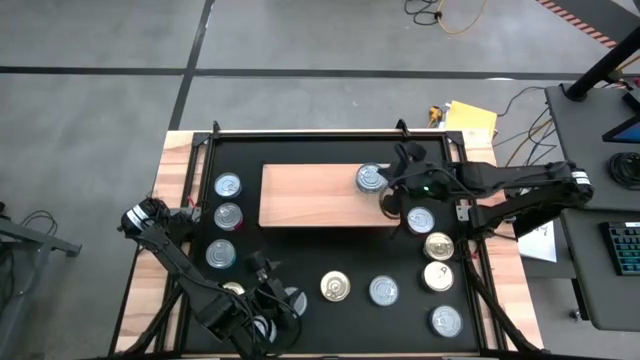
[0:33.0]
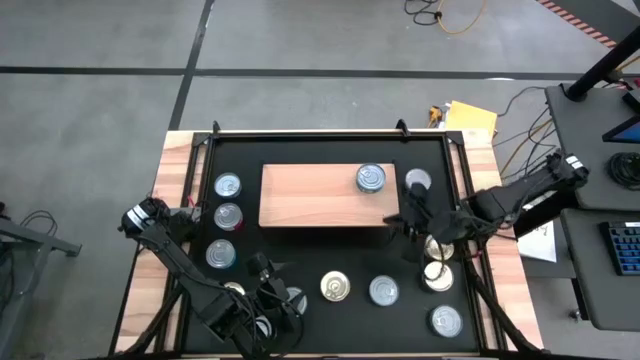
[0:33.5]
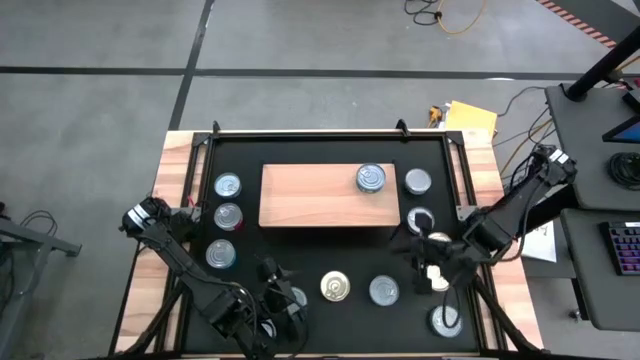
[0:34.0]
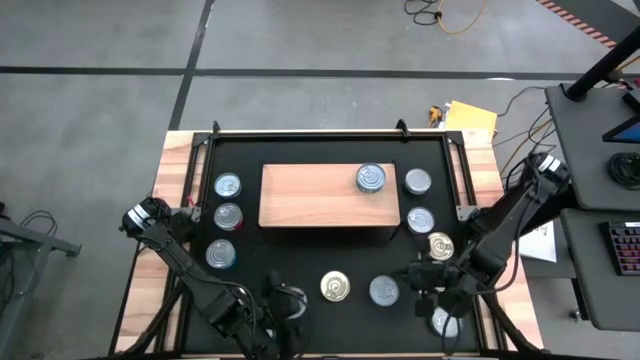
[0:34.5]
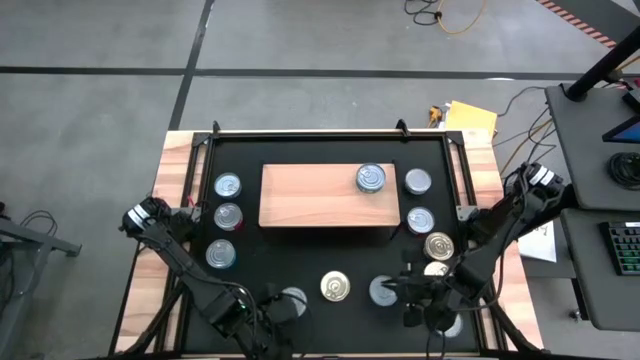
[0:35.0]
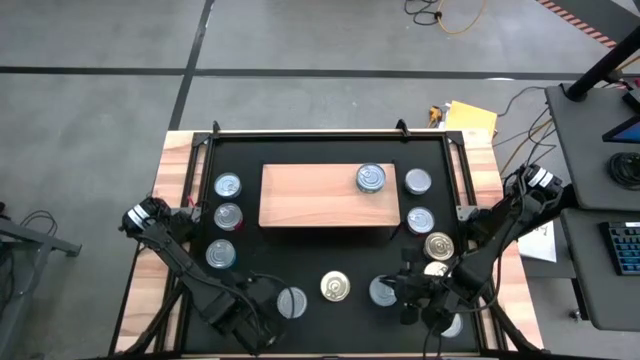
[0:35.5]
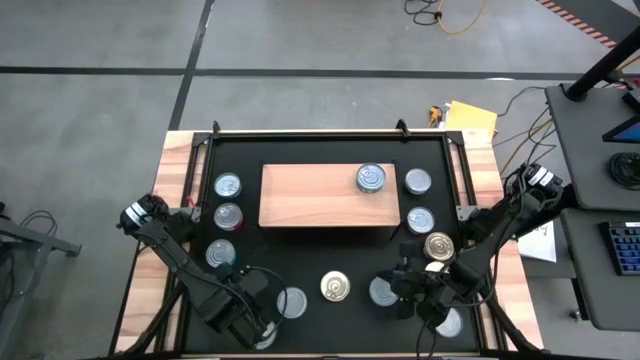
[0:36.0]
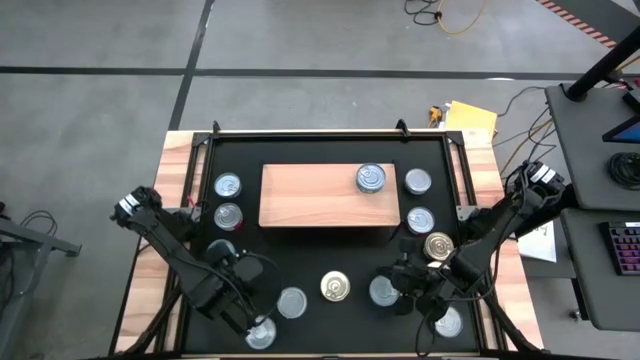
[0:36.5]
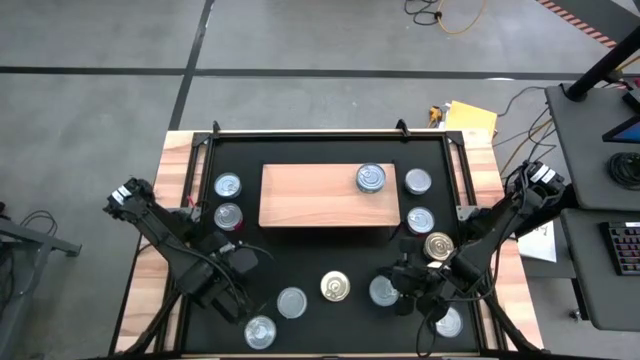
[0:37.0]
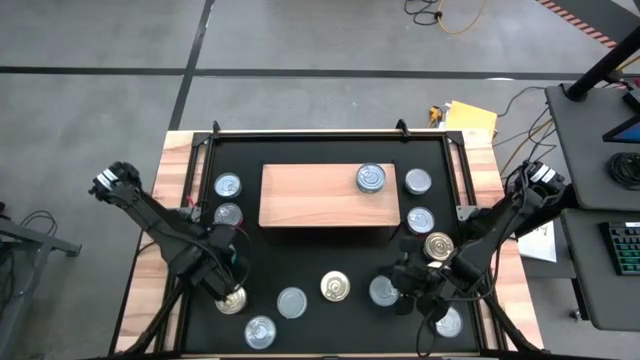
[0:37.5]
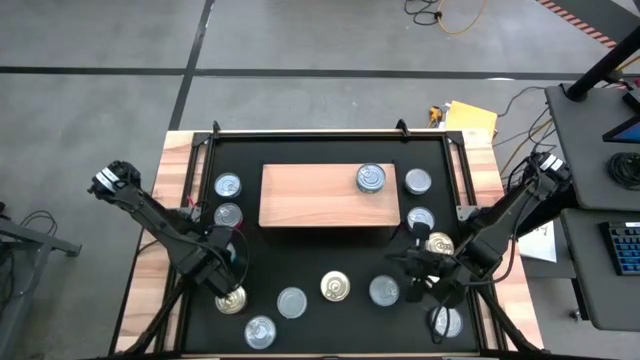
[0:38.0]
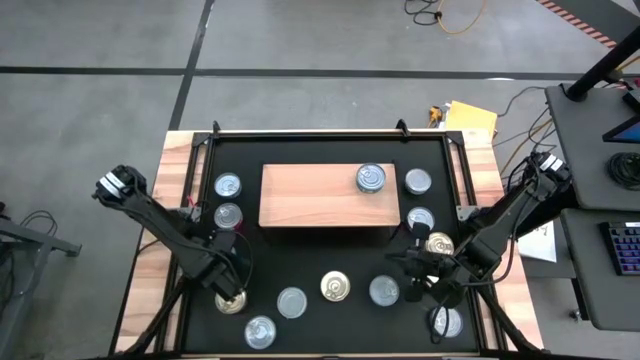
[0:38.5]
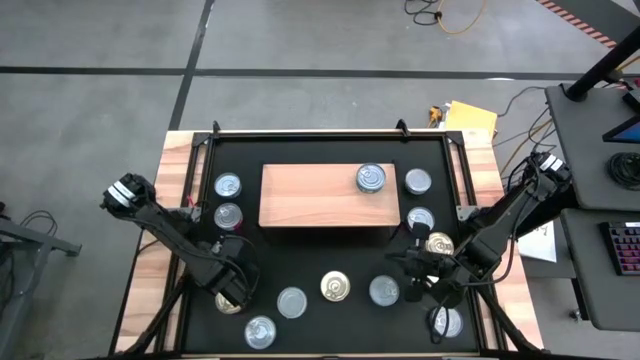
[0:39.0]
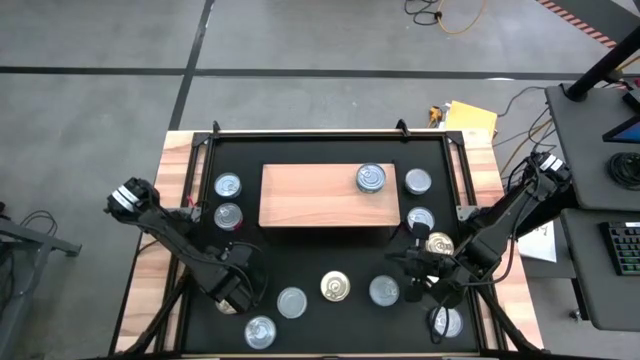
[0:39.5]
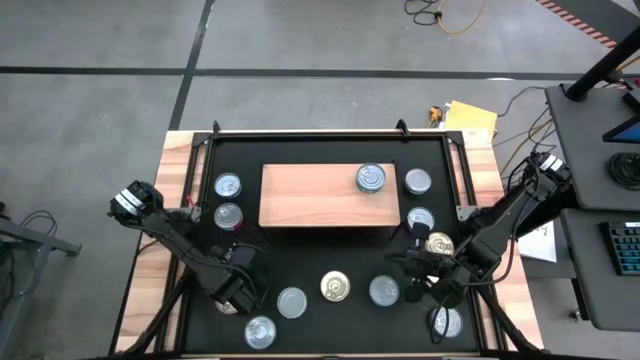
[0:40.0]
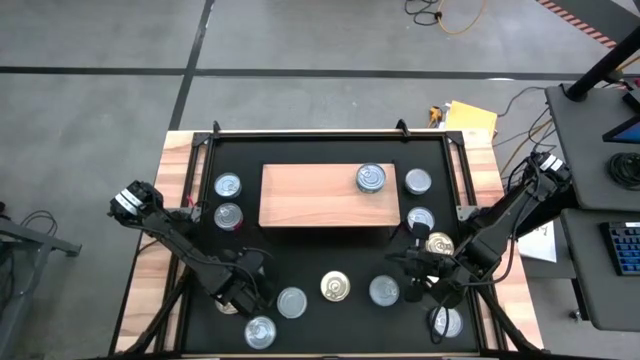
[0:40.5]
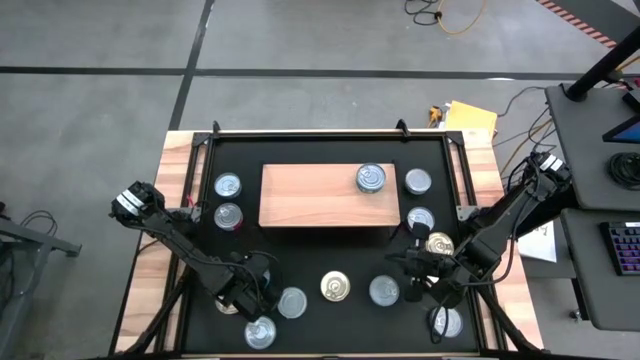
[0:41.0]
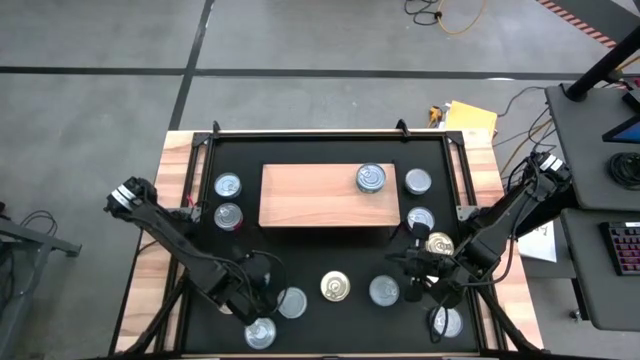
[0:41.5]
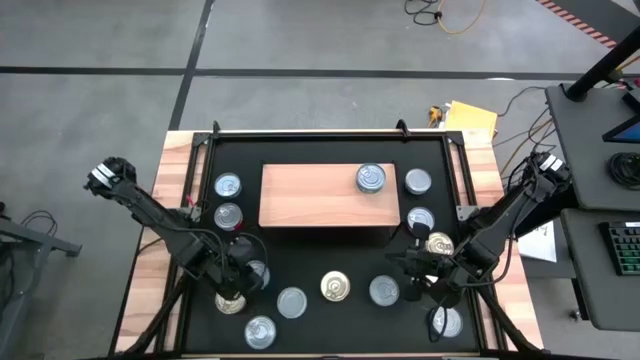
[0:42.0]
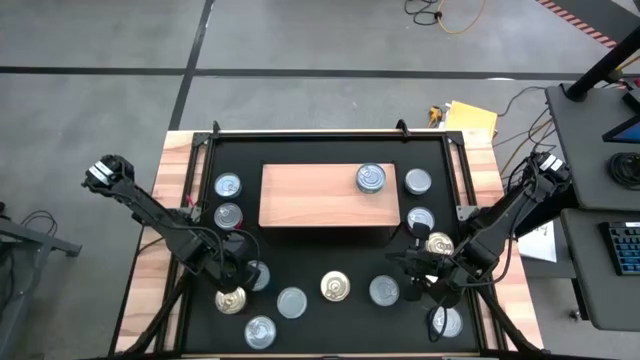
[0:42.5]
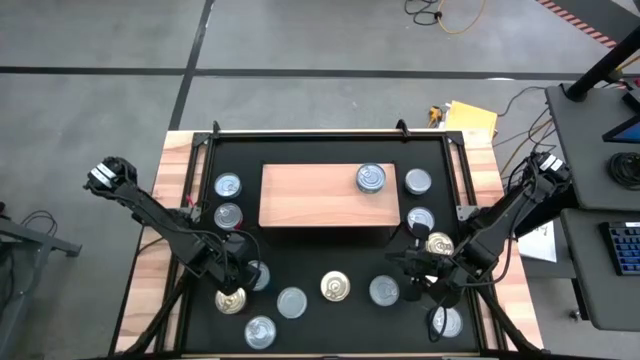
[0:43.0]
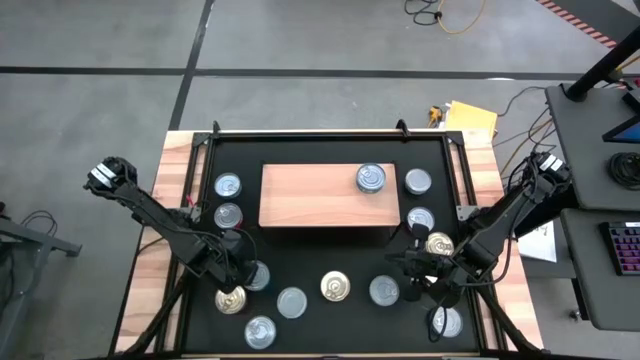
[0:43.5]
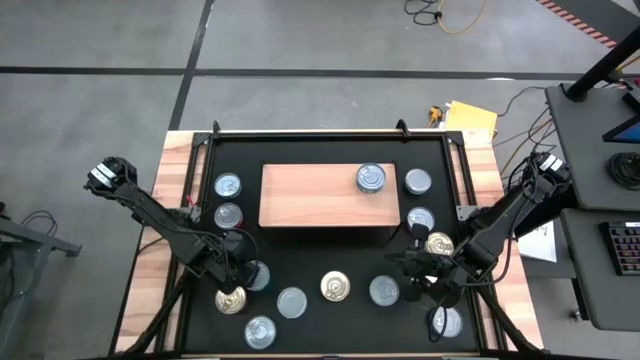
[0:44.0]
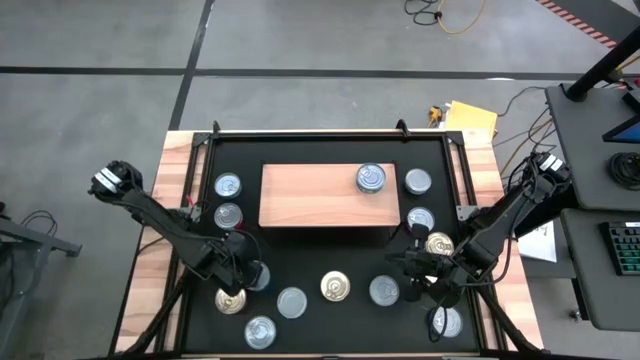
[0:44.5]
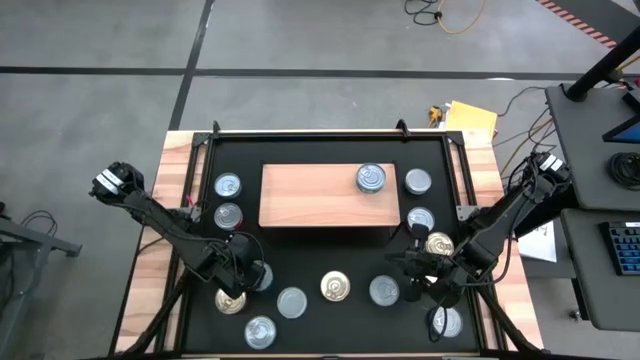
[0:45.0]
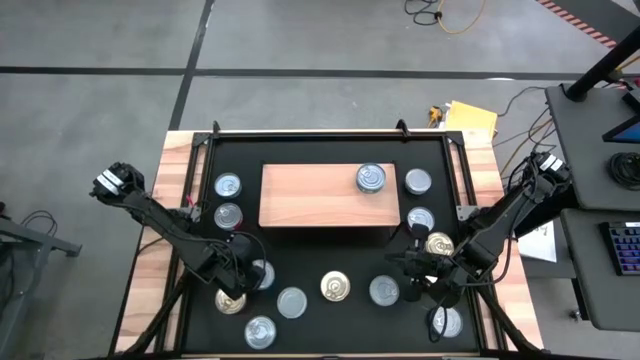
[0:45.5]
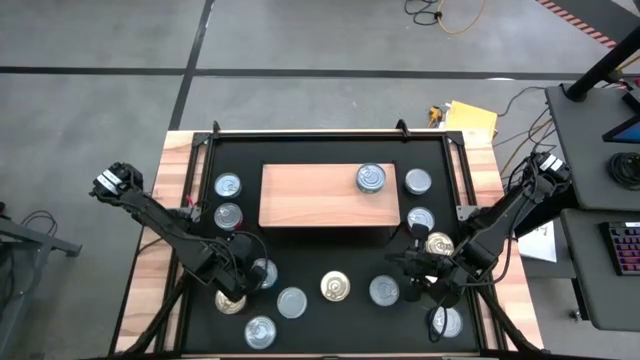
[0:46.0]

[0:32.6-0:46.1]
Task: Stack canned seafood by type on shelf
Put the light blue tuna can on the shelf
